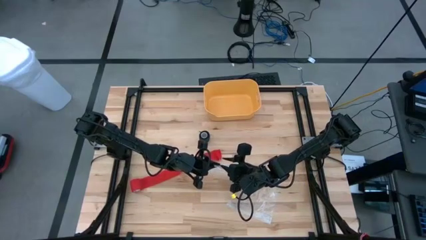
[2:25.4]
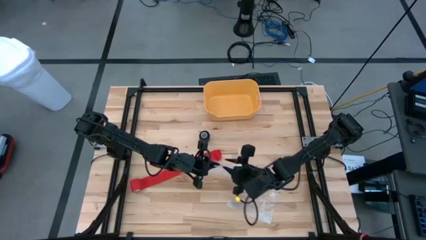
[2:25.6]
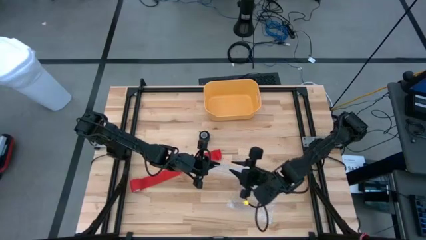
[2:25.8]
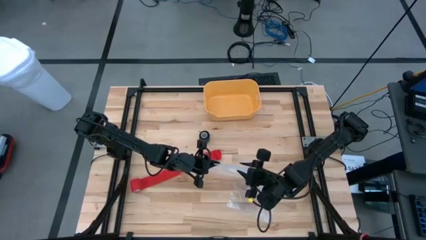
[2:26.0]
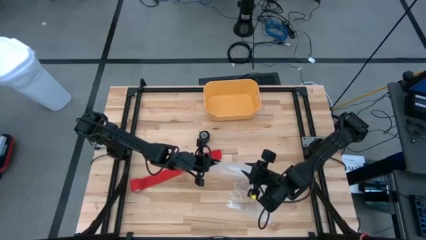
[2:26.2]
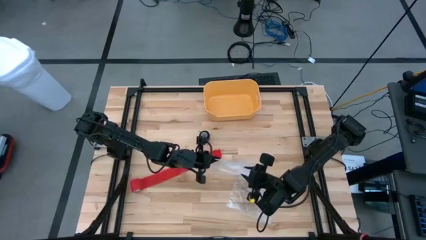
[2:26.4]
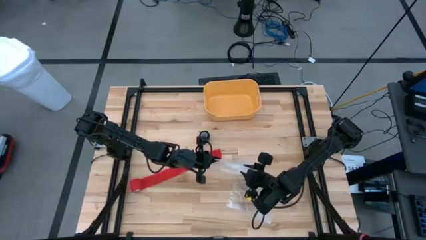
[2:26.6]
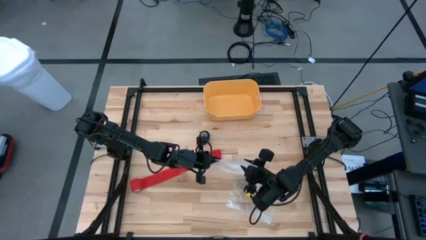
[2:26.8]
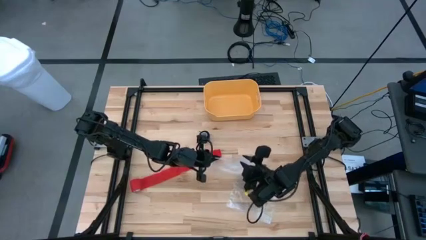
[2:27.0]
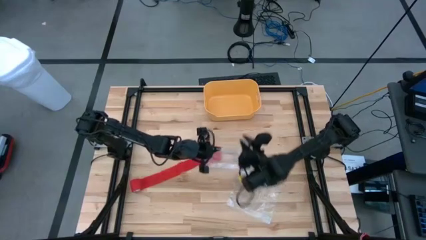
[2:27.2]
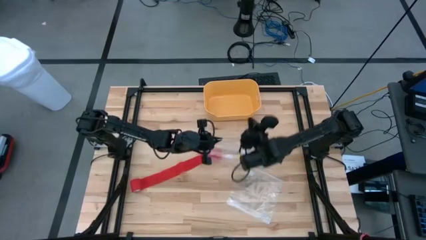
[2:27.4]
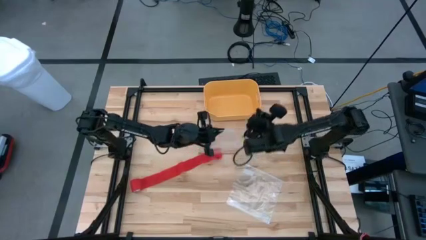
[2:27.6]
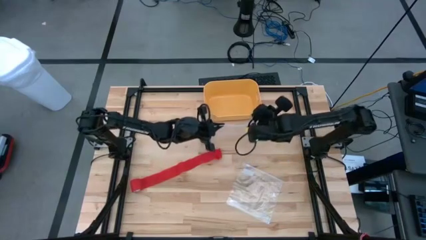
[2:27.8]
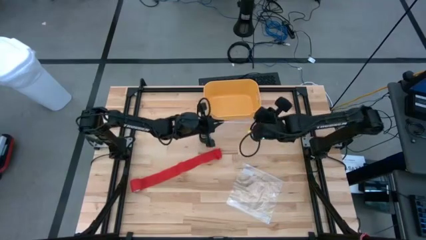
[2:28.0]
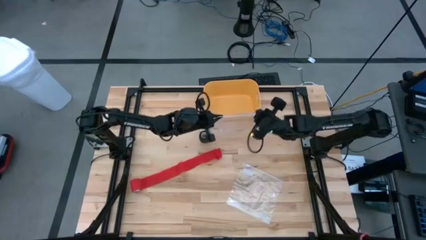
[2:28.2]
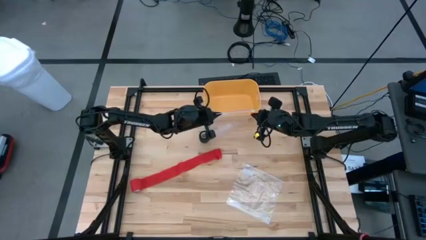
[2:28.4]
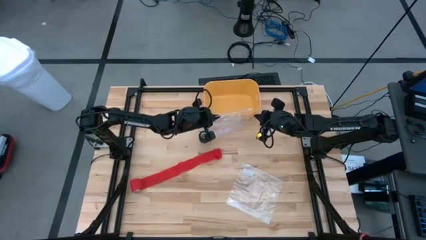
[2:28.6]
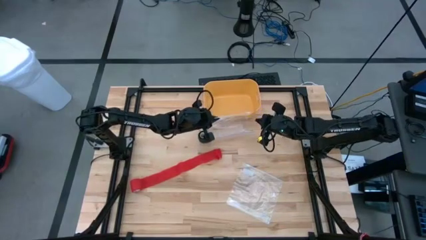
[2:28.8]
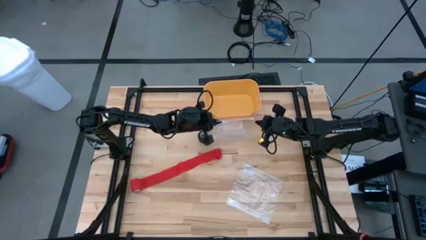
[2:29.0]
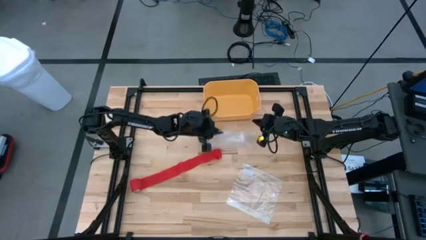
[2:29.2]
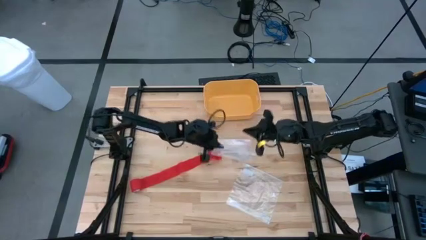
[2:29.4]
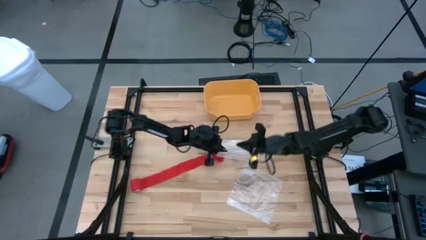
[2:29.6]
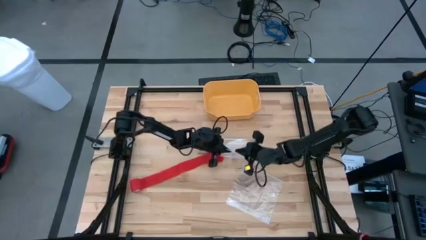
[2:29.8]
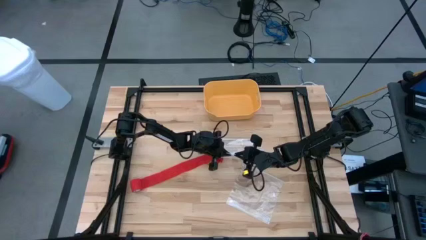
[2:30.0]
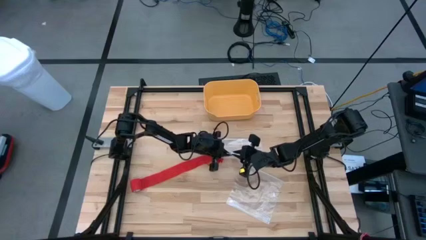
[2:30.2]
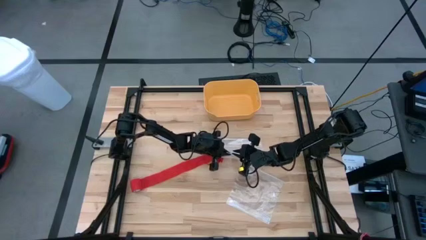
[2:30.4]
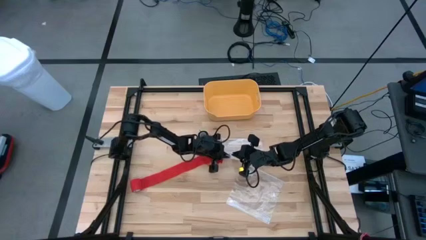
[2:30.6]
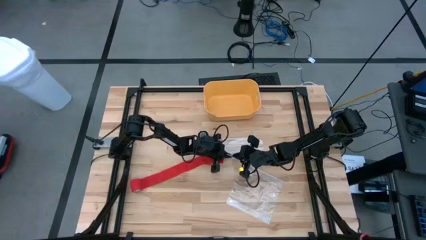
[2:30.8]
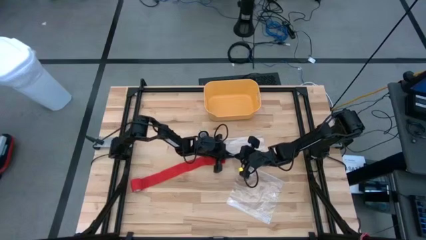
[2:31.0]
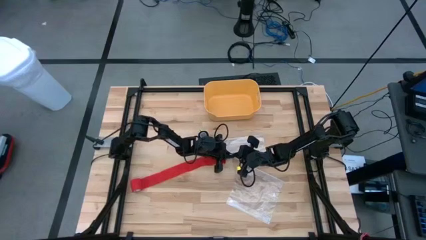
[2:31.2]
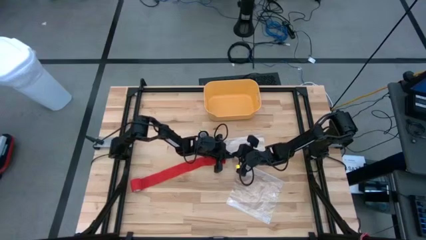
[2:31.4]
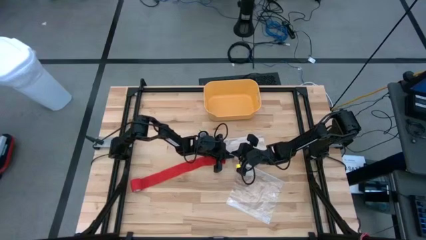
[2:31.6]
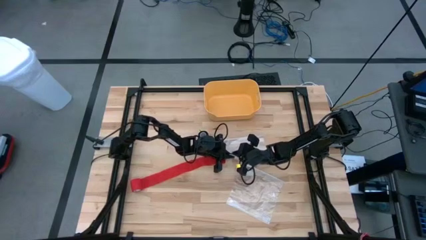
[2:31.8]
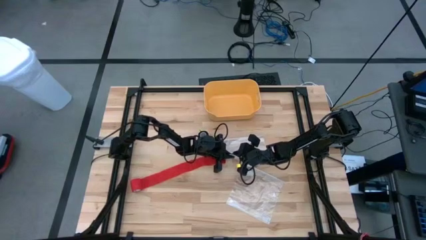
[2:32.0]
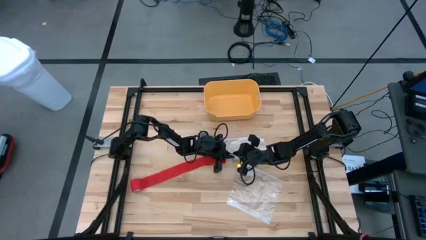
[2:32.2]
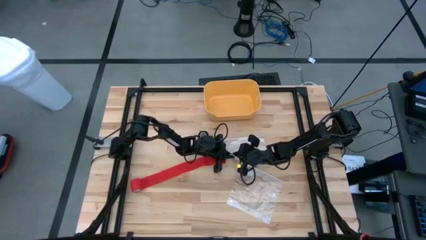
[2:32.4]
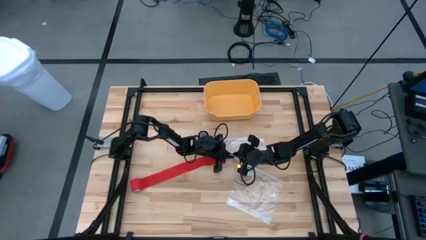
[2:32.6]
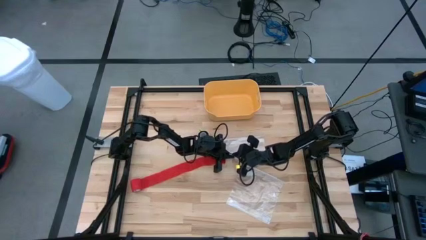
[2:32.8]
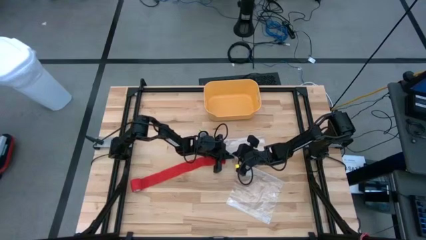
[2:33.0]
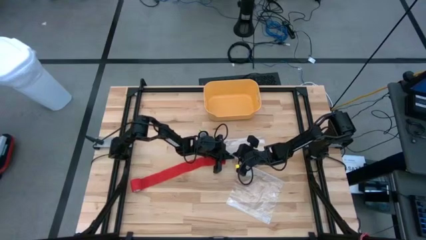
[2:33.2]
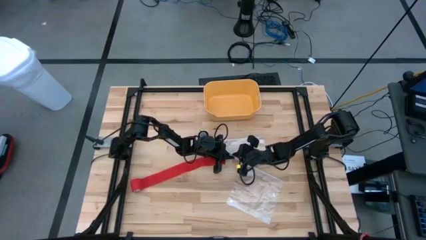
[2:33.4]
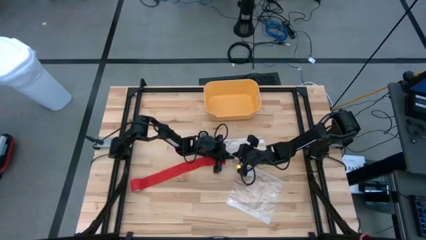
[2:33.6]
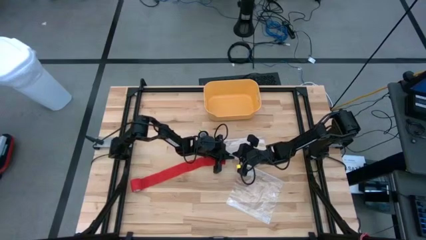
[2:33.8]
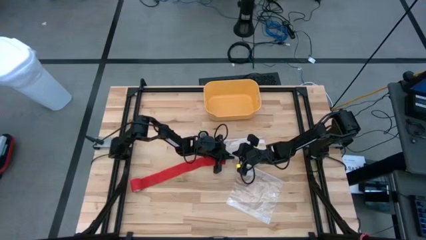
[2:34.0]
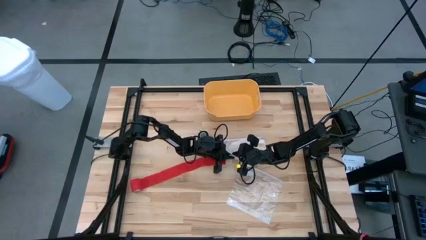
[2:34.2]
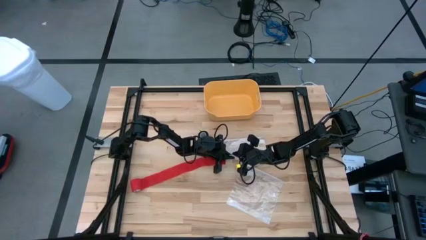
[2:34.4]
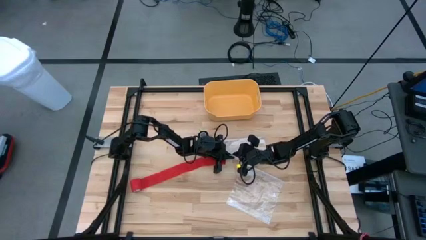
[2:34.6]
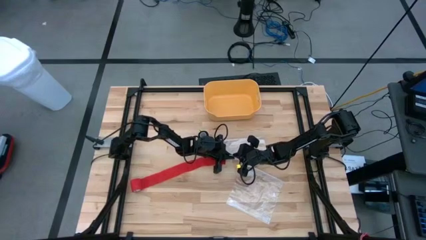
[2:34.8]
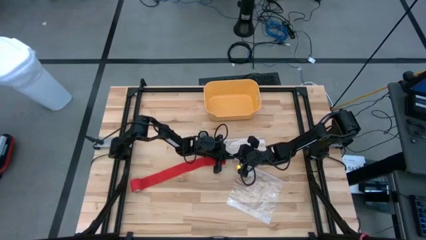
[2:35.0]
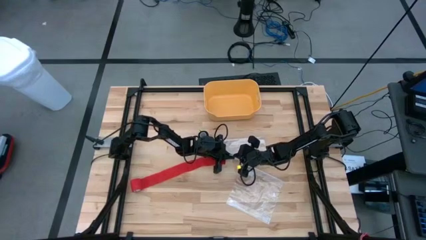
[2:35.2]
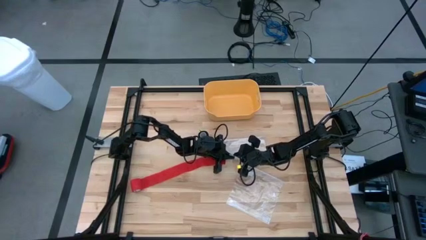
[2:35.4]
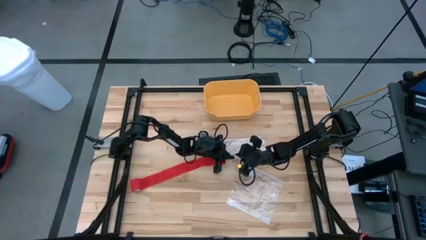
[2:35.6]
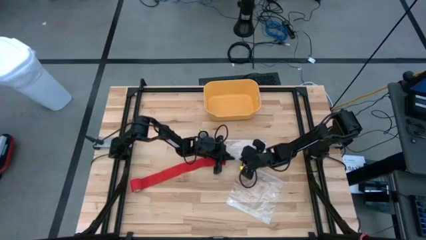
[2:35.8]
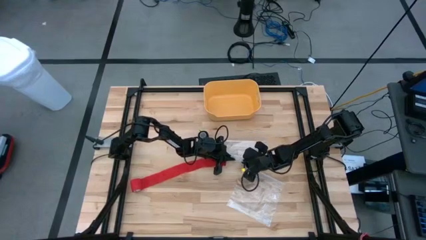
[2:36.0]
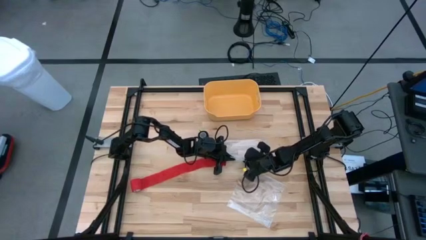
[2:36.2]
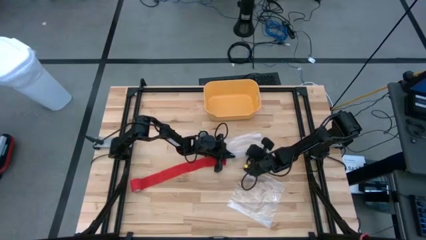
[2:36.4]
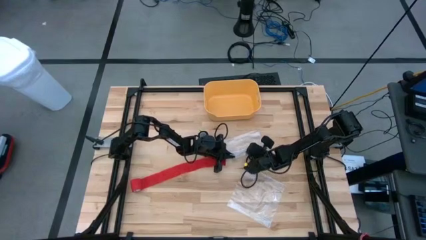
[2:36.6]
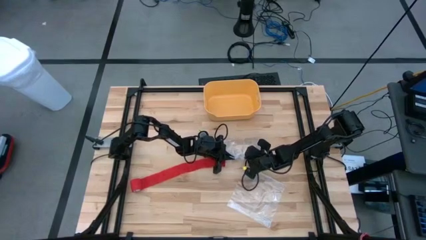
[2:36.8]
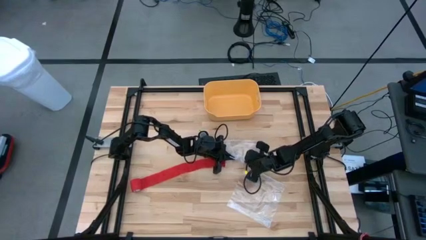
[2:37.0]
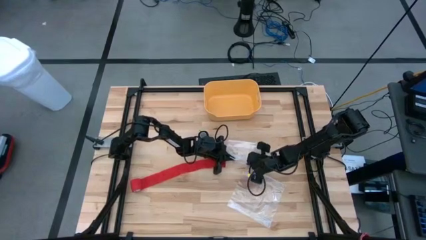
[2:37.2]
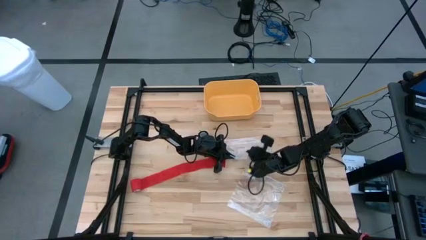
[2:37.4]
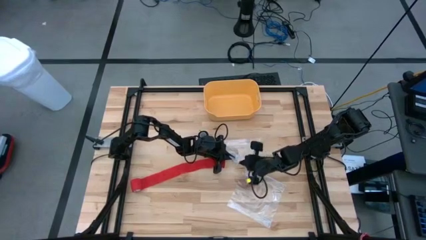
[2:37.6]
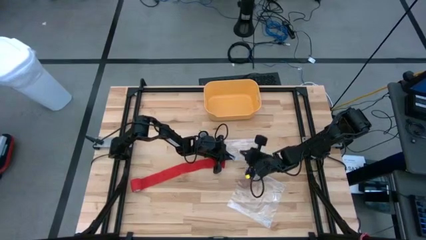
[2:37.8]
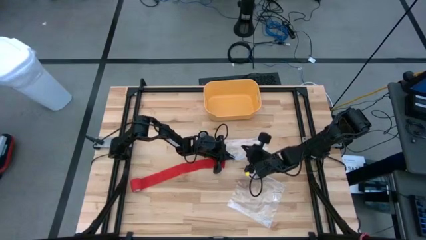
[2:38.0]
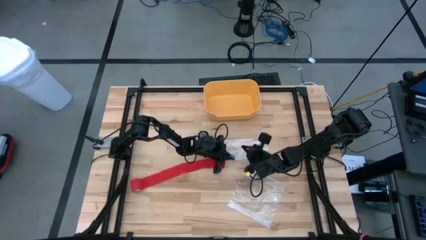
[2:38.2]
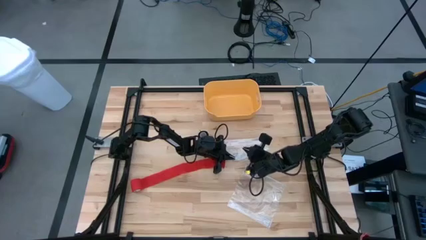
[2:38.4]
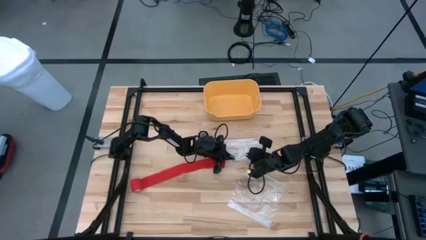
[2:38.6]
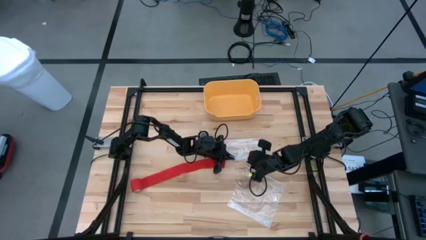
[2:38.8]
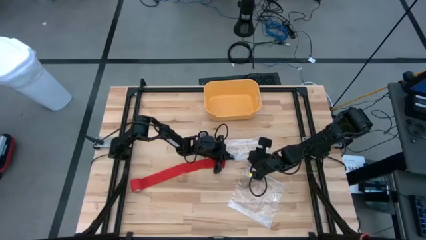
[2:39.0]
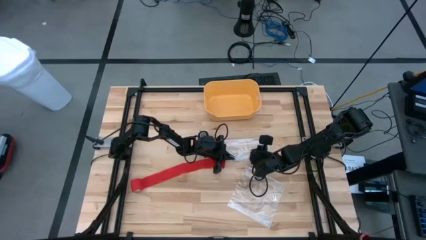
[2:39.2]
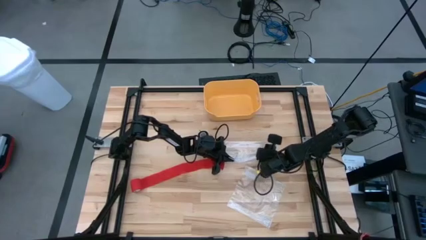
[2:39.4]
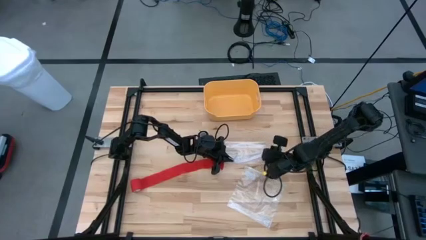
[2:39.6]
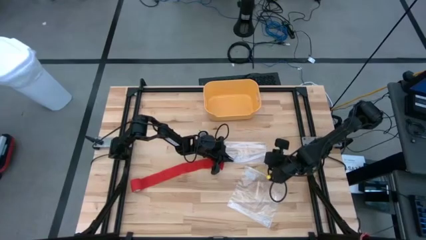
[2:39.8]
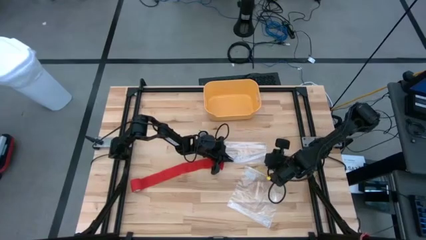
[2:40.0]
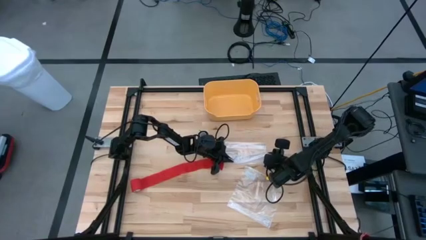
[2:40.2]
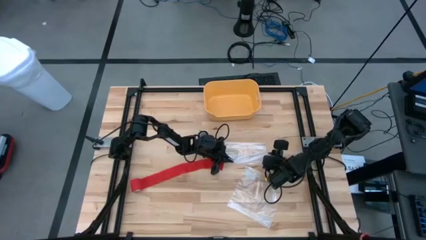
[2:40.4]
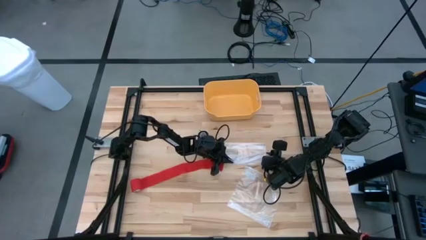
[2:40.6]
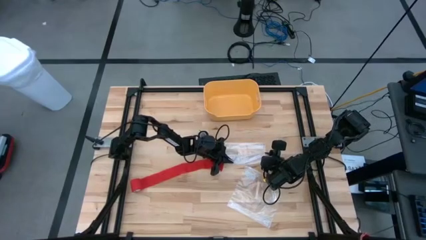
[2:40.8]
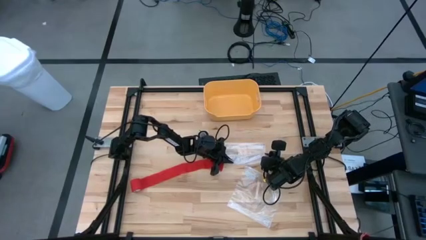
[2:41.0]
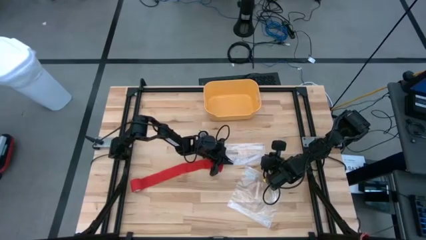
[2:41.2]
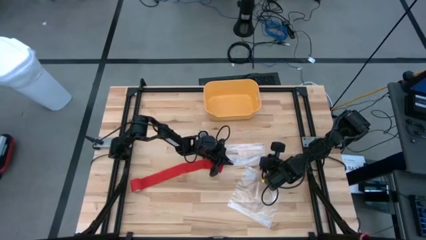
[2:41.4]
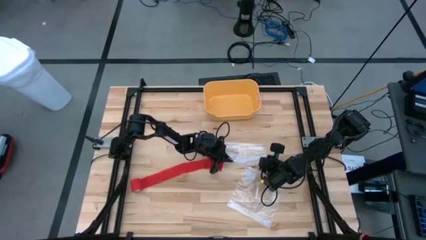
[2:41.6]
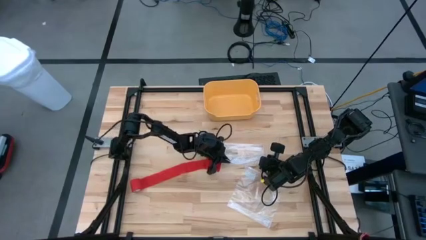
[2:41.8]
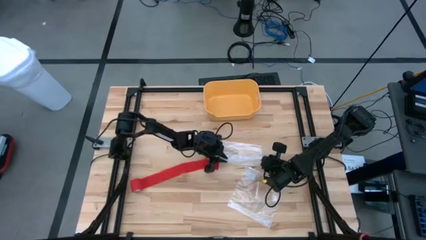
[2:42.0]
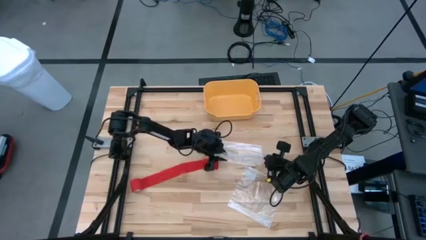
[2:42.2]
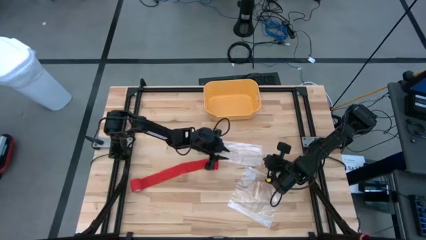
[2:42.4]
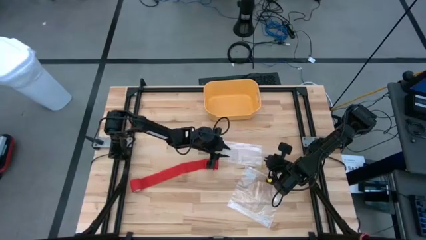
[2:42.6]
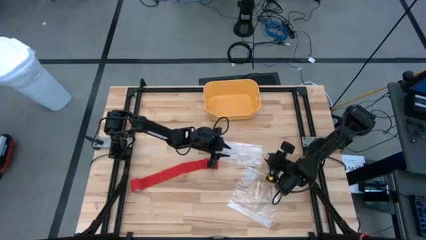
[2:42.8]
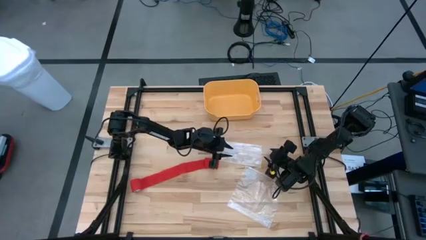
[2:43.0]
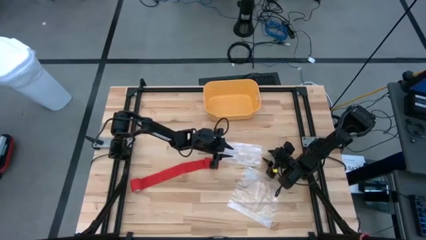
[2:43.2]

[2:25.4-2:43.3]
Task: Roll bandage
Open the transparent zip bag
